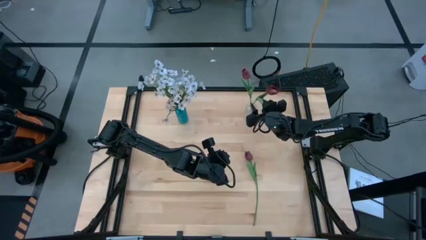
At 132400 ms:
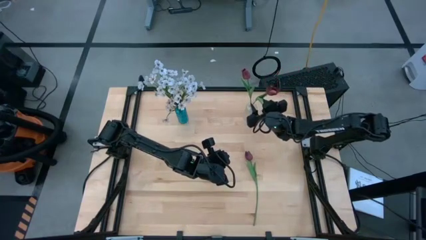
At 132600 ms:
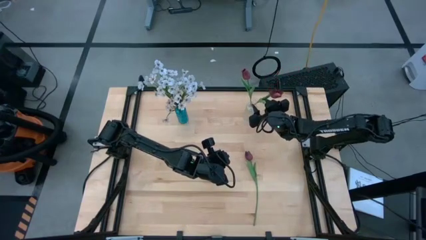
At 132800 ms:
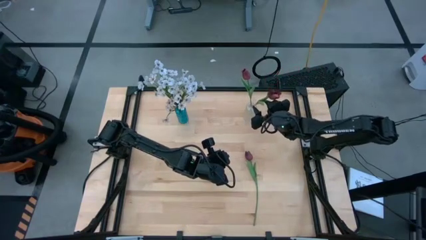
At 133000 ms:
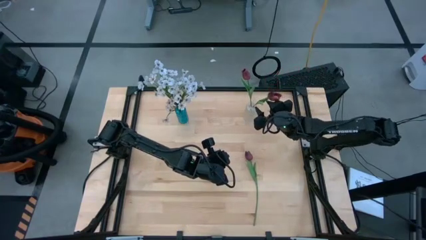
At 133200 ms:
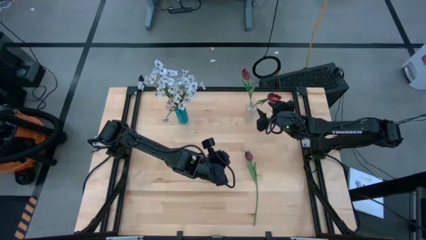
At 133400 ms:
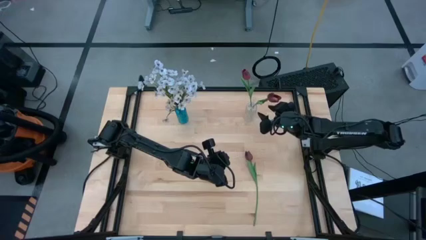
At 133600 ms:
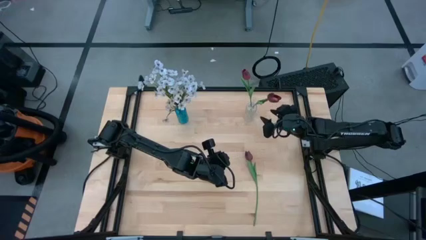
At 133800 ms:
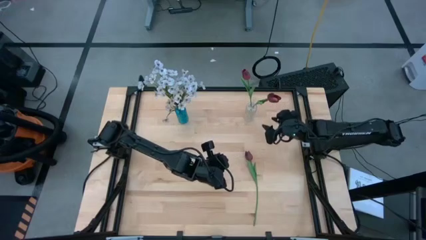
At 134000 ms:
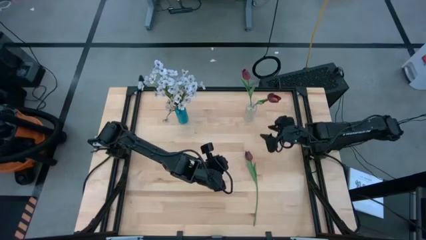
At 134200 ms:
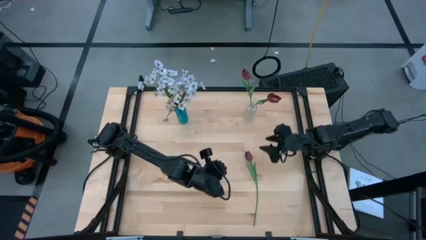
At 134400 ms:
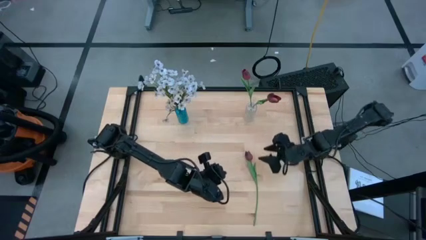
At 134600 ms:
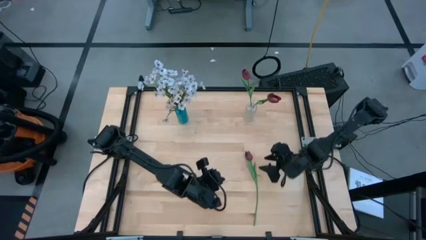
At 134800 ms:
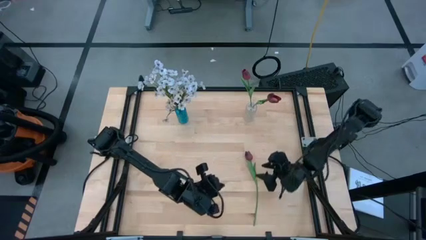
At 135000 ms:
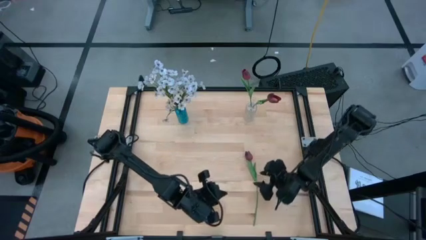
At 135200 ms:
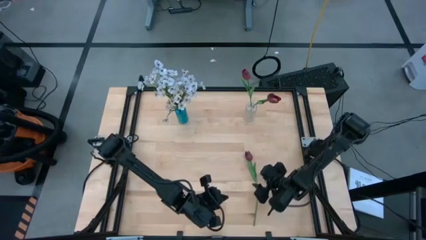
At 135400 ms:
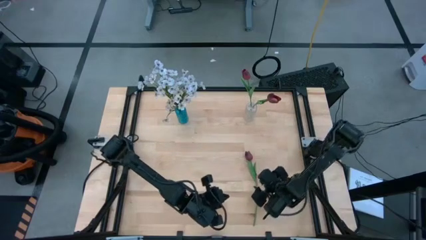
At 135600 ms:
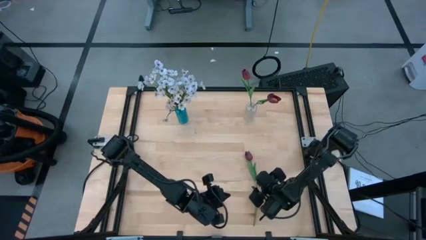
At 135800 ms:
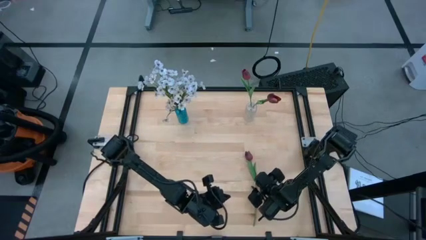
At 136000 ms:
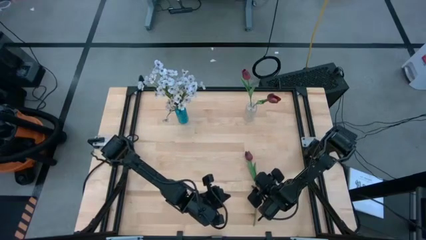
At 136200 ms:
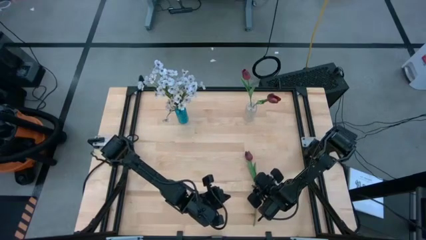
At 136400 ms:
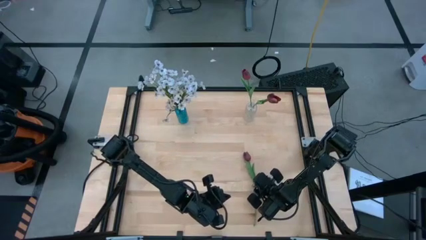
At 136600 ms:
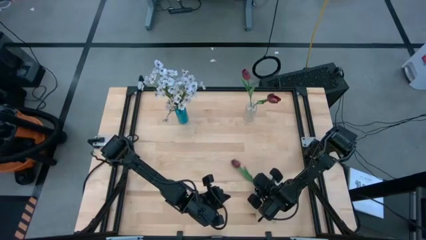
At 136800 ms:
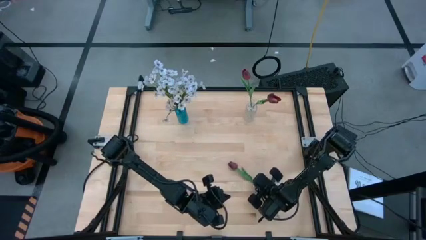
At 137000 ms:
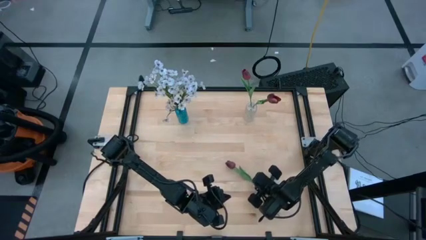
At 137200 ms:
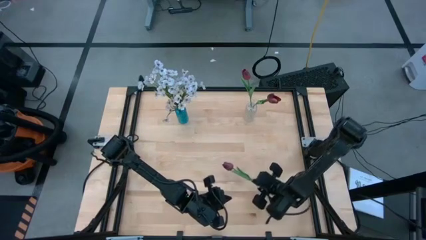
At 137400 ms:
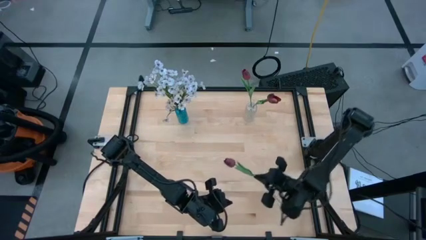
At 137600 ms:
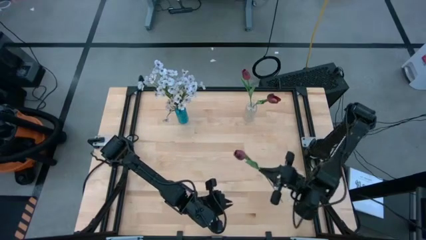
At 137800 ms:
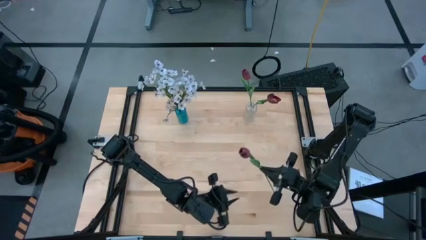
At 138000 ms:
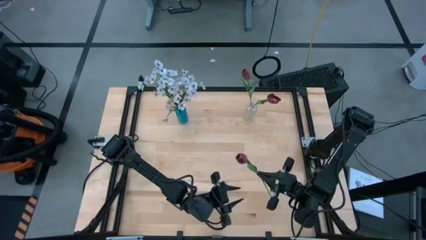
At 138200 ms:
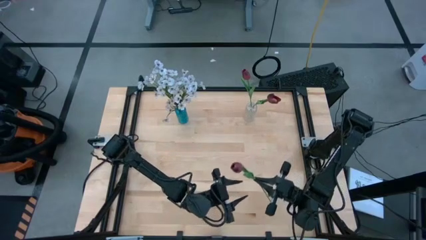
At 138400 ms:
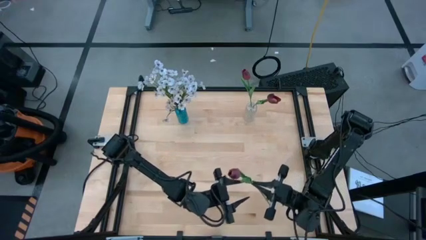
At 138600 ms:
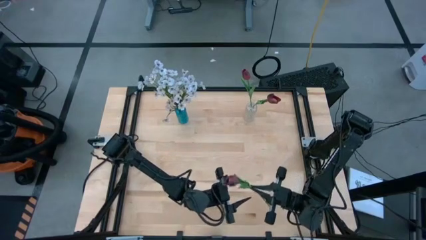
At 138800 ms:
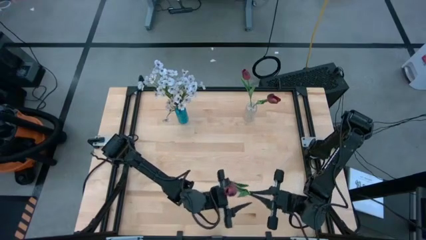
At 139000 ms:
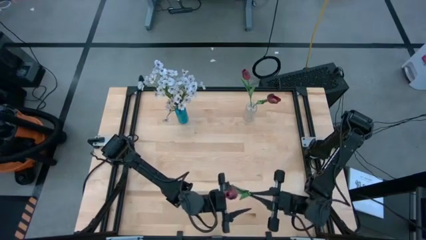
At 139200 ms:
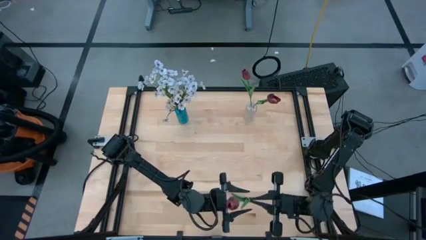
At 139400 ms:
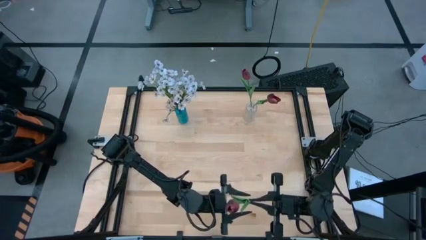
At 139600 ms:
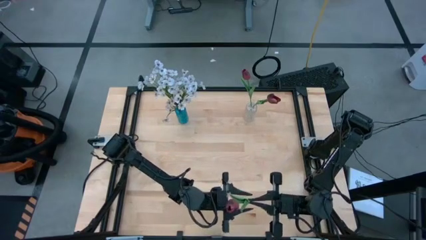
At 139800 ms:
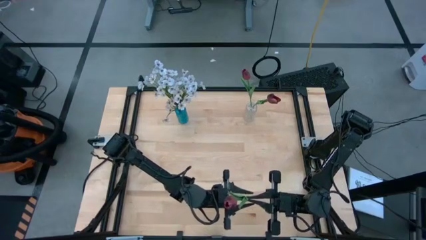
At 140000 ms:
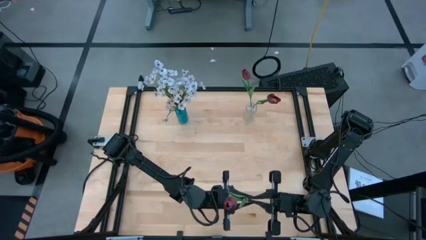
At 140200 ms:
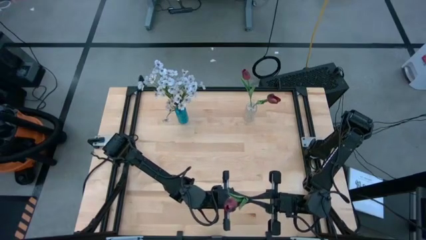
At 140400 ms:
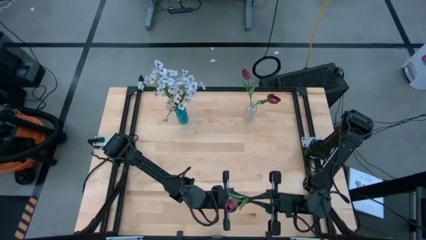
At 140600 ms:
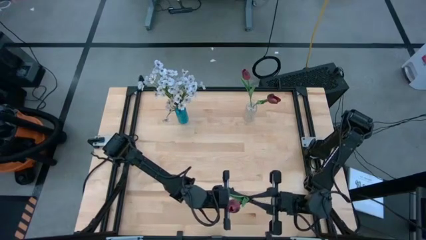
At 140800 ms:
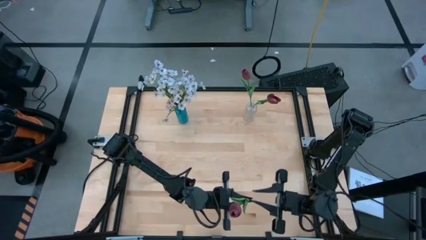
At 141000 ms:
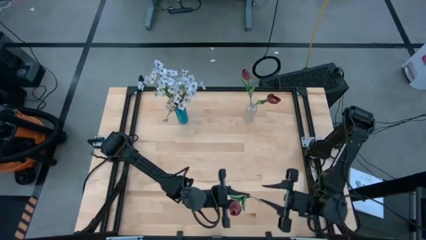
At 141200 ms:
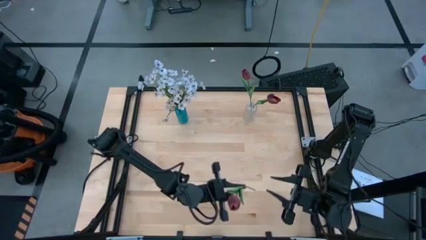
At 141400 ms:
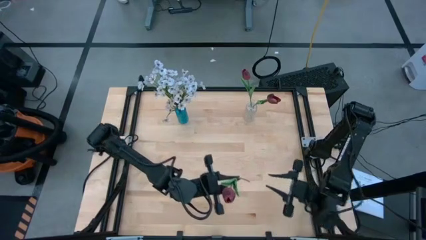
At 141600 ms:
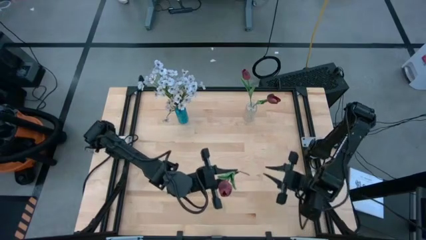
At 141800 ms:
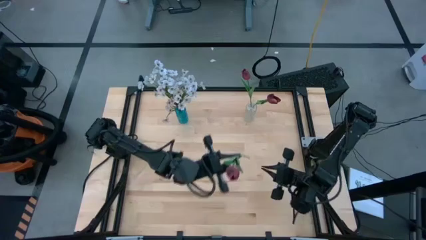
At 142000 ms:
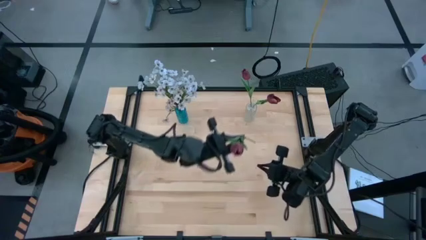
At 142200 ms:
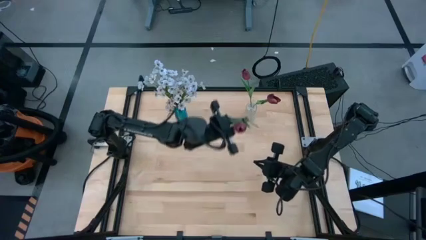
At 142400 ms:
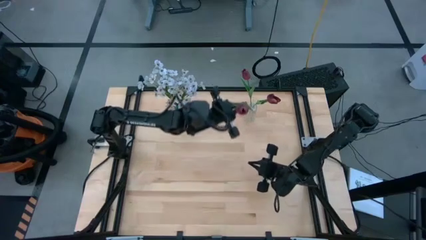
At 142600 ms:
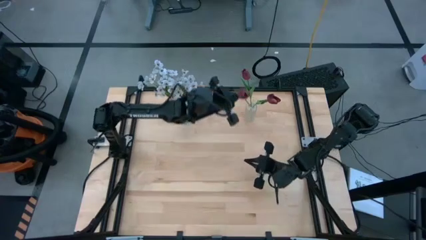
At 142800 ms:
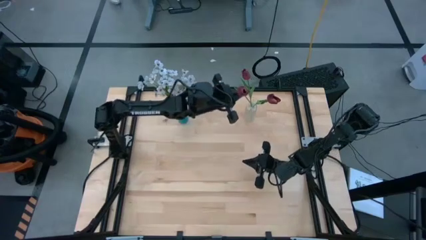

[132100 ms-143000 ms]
Task: Sort flowers into vase by color
Put the red tulip into the transparent vase

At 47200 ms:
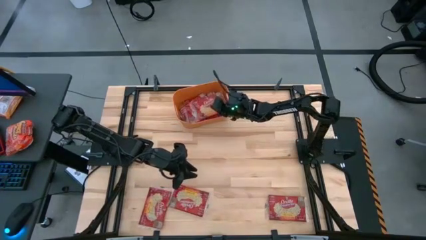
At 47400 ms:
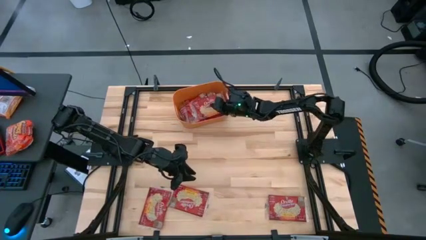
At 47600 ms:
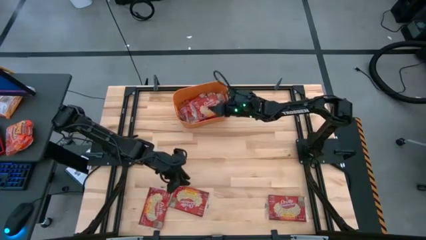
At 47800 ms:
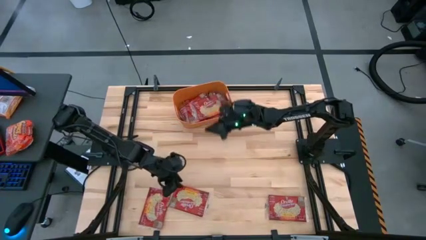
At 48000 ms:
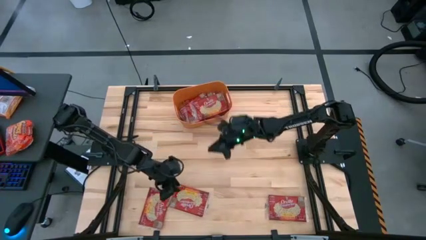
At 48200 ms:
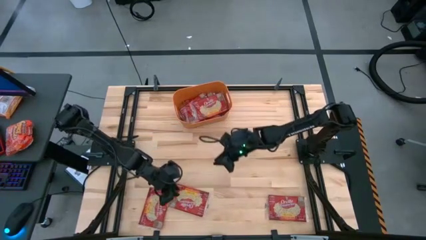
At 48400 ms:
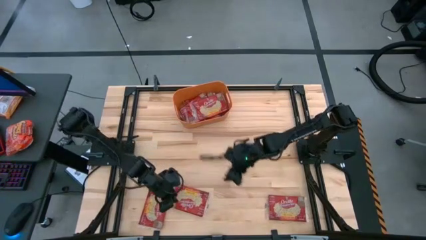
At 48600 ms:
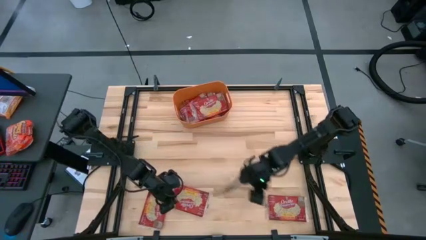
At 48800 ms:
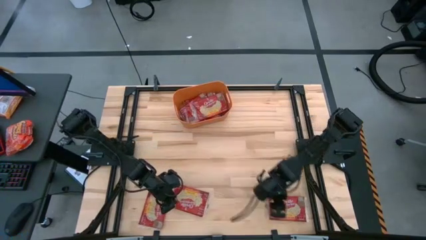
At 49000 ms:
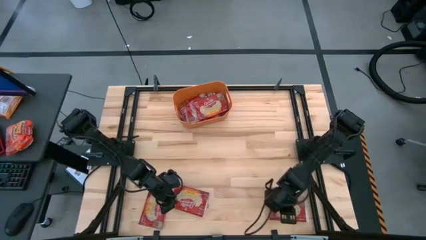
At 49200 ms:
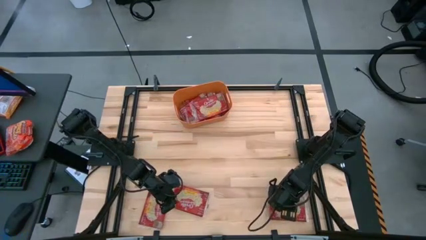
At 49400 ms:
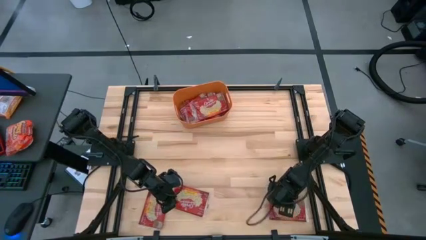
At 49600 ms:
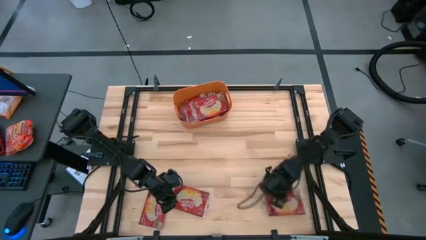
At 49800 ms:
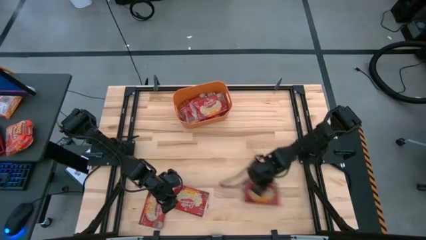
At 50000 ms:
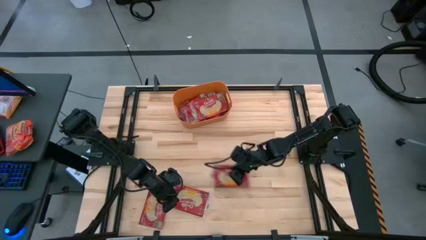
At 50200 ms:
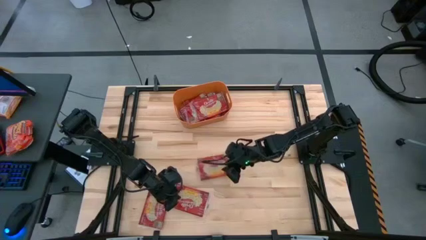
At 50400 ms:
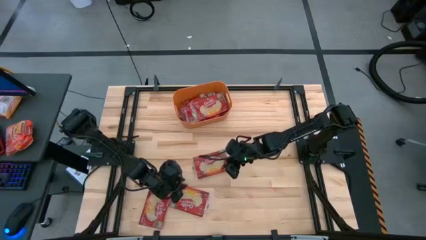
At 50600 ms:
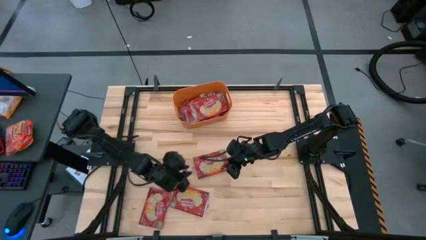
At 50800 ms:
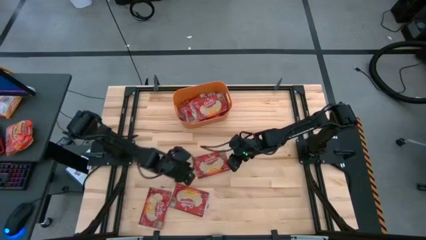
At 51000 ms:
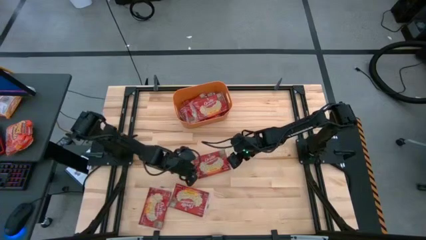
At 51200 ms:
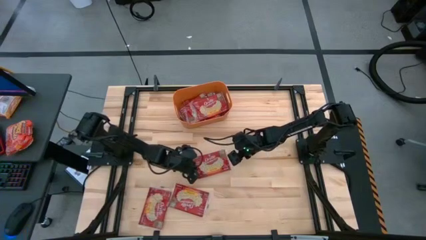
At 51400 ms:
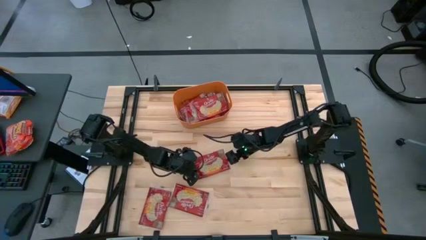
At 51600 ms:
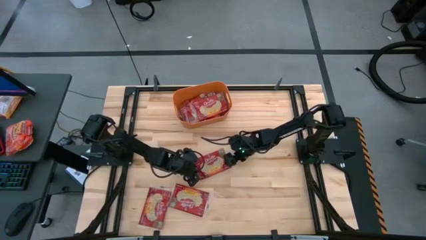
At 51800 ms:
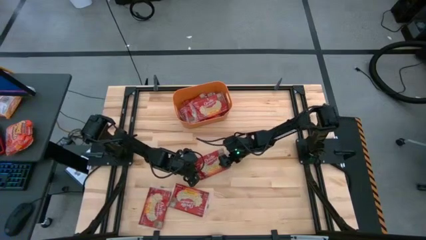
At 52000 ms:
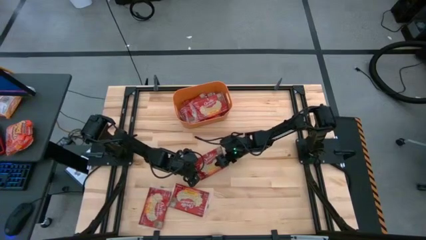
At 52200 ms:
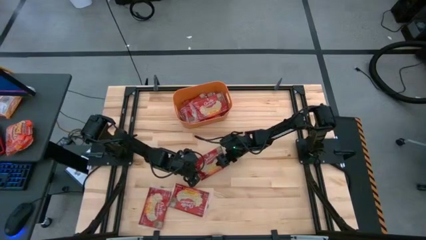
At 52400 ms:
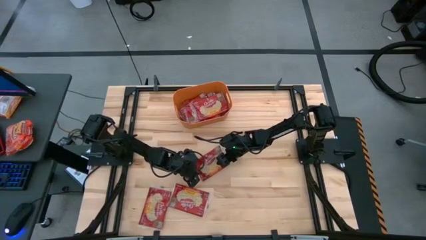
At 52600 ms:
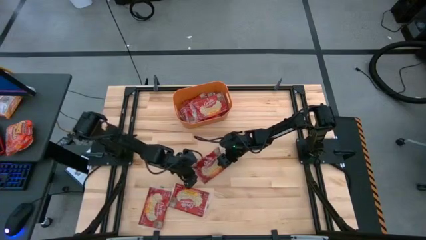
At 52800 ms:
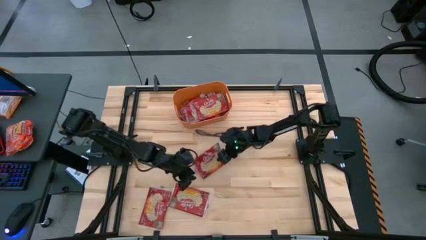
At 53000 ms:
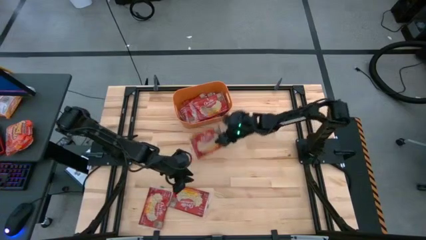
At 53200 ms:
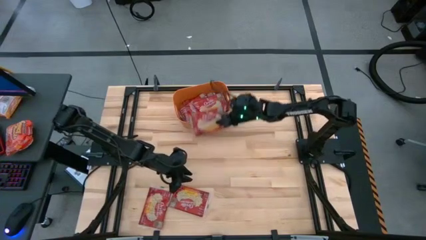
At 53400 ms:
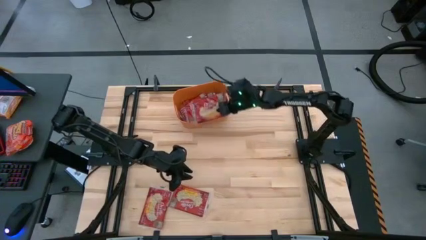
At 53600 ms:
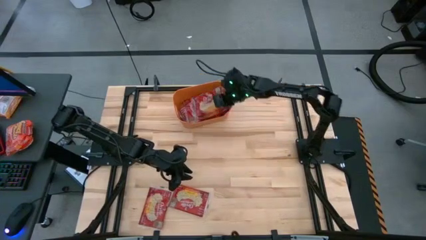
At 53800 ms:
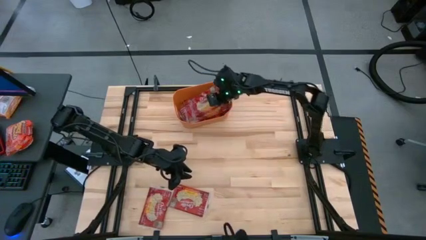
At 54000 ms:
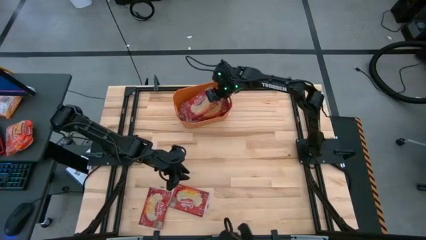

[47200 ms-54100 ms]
Task: Sort popcorn bags into baskets
Put the red popcorn bag into the orange bin
